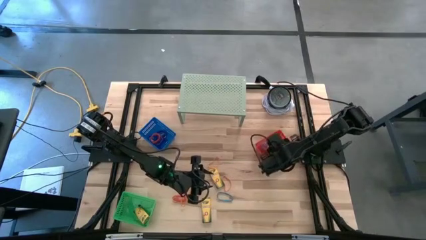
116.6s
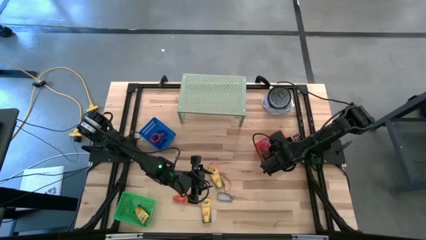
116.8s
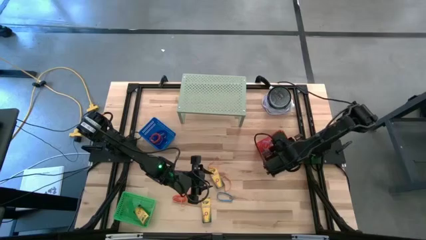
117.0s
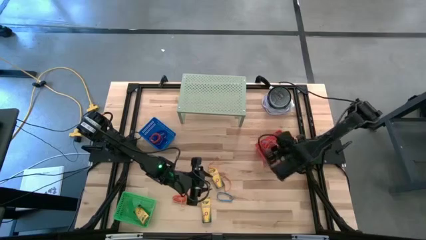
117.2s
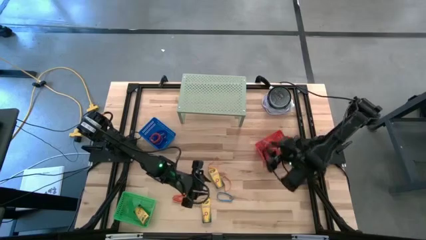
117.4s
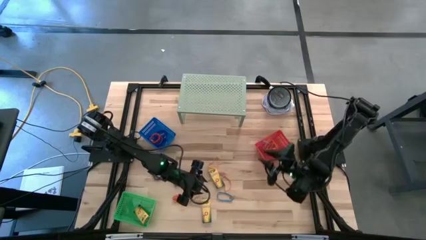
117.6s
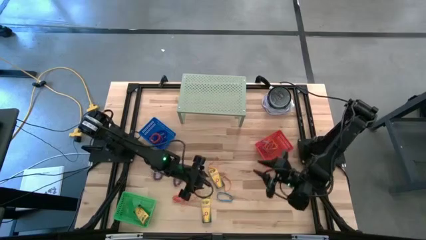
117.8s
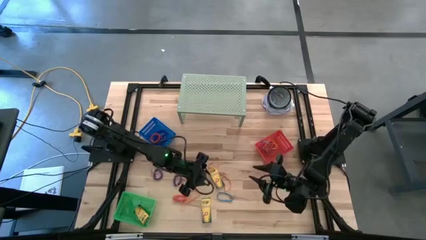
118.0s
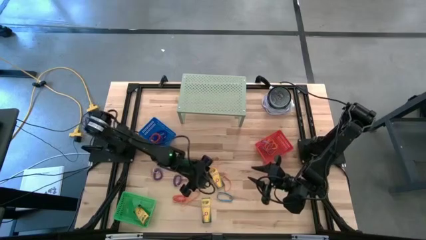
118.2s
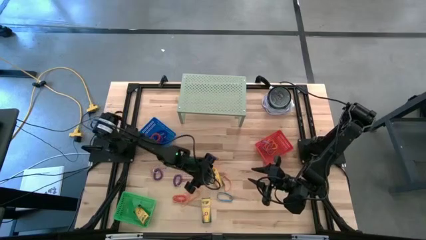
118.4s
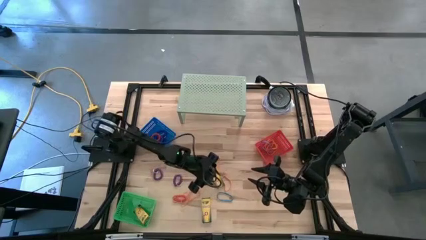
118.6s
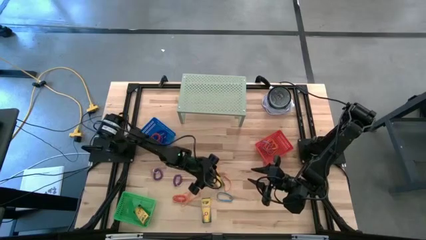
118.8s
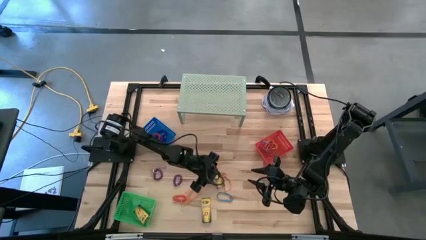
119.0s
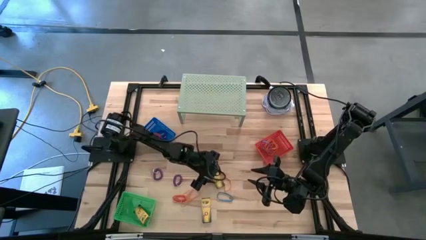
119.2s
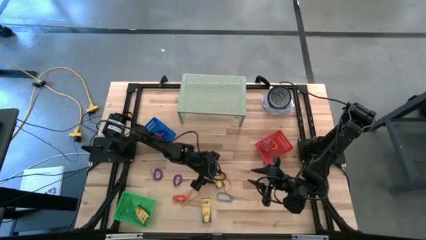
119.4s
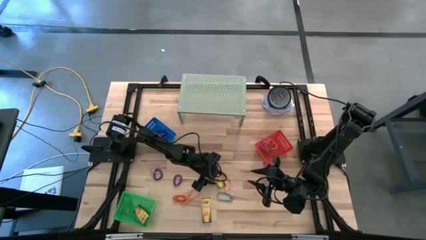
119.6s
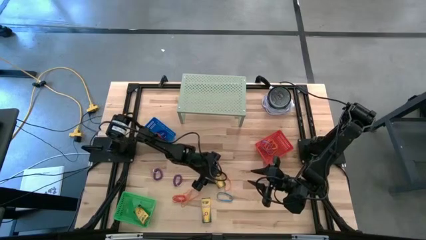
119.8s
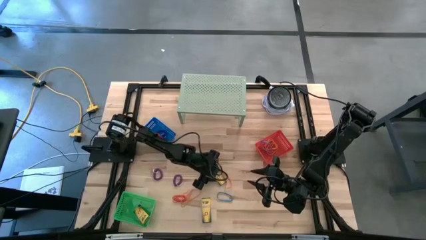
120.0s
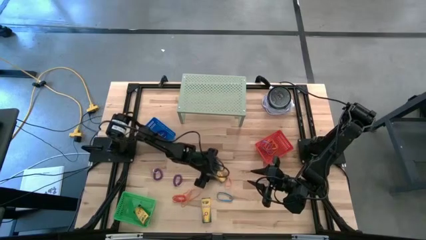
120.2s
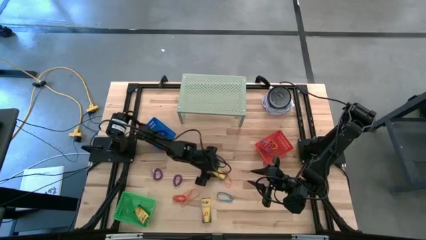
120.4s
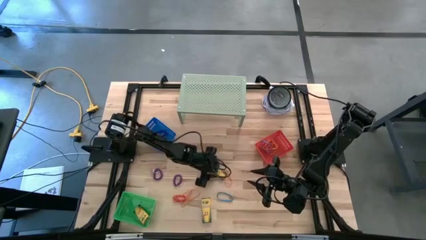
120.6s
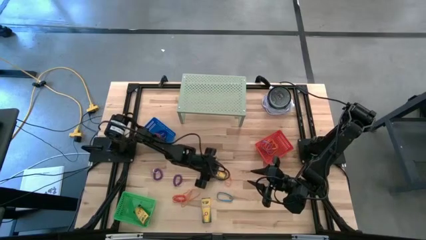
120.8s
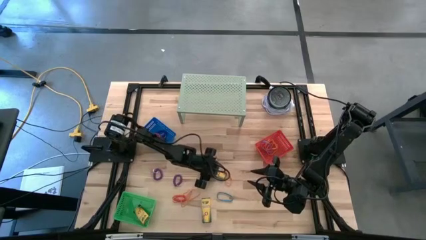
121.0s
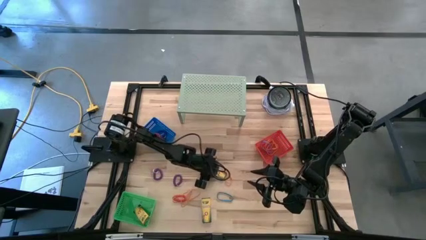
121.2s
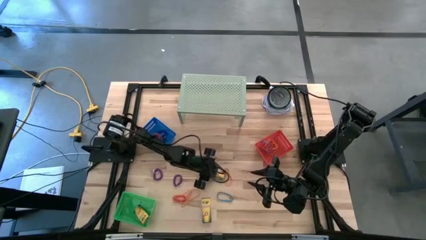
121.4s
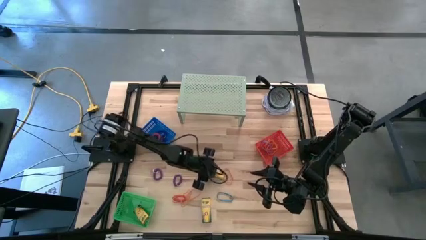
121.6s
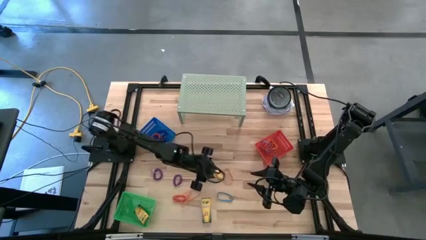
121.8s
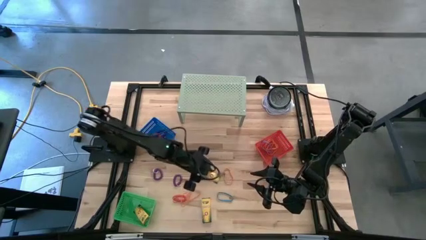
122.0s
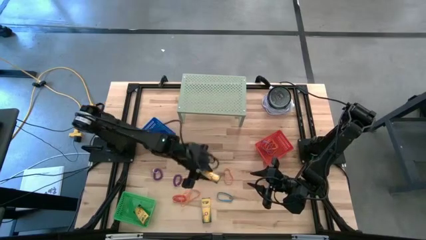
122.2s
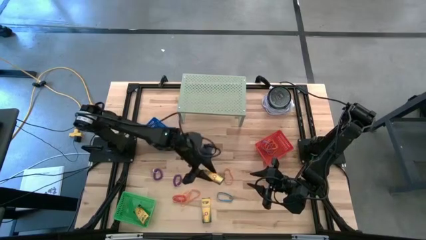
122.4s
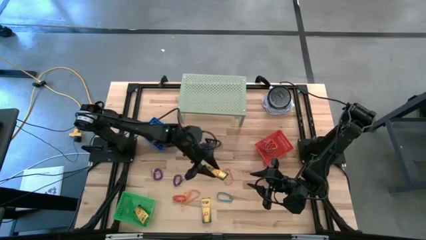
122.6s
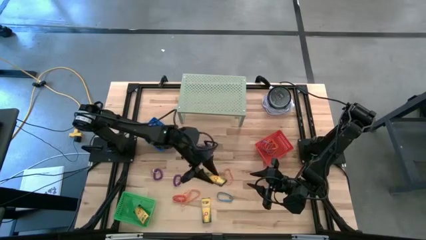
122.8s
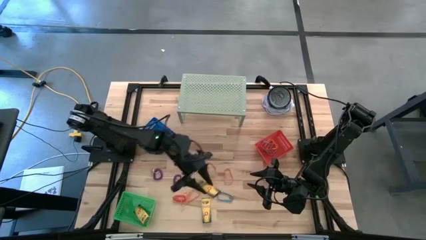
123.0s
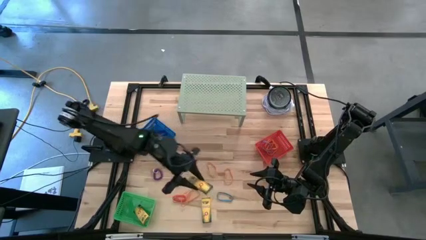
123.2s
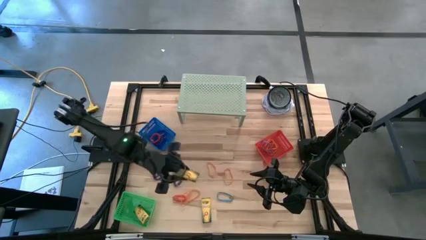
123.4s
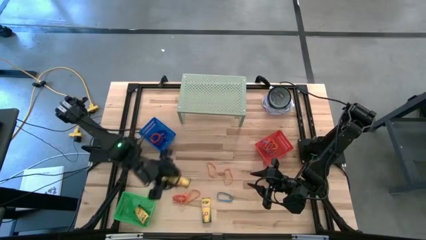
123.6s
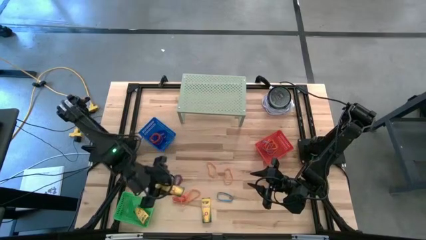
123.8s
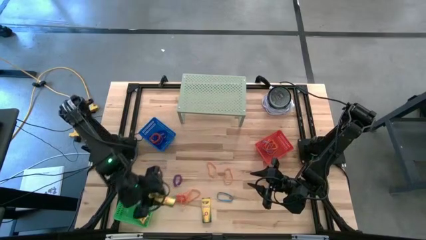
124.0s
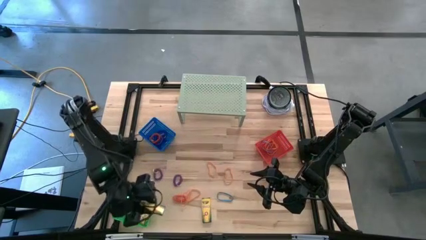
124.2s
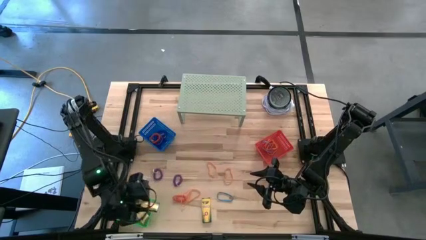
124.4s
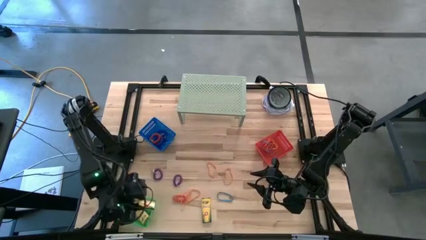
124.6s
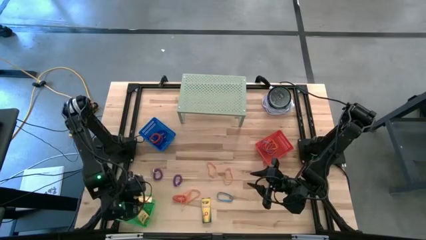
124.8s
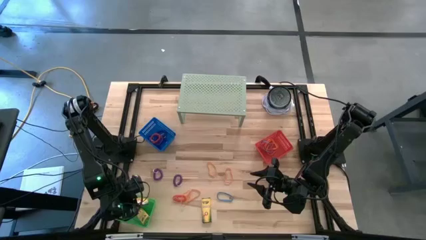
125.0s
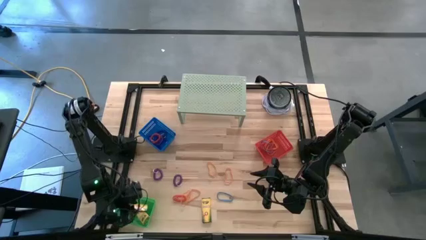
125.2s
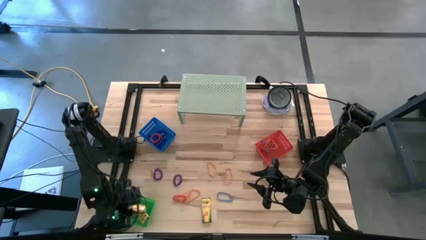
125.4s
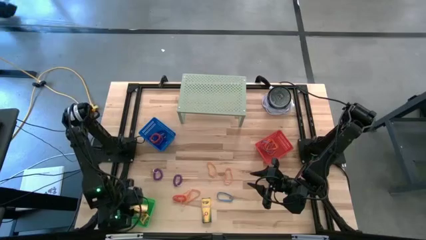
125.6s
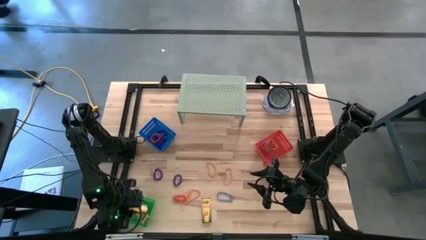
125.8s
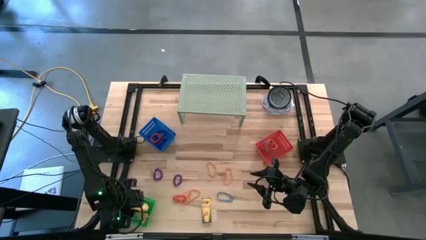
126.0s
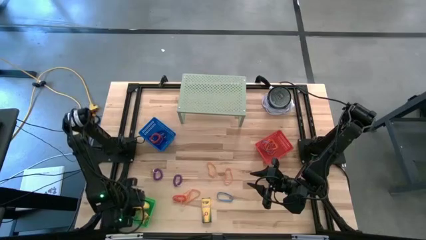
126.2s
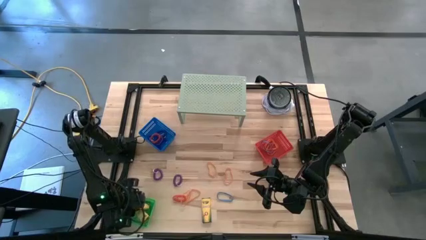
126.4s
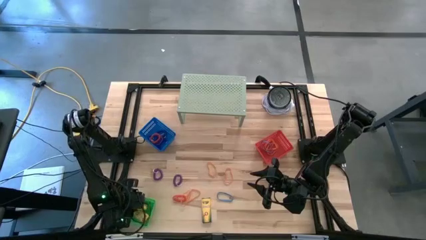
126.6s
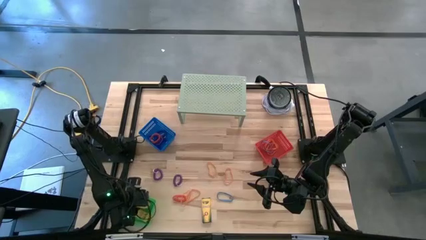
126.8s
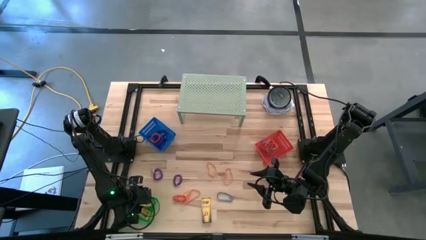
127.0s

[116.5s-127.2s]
Task: Pick & Place Office Desk Supplies
Put the crayon box into the green bin

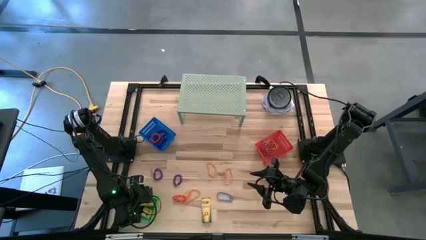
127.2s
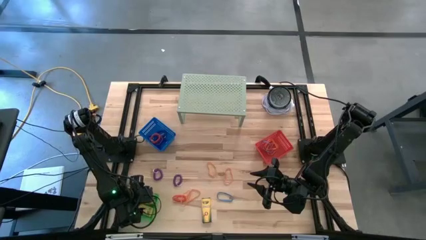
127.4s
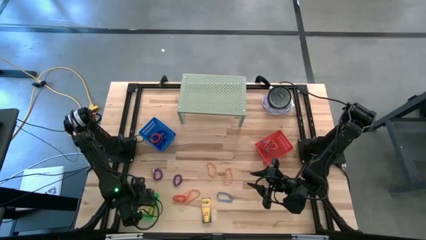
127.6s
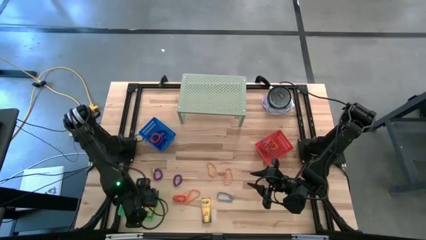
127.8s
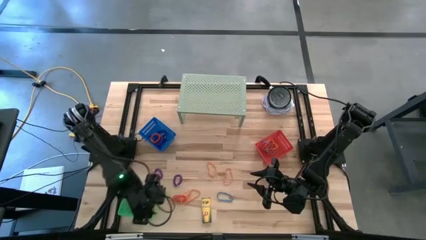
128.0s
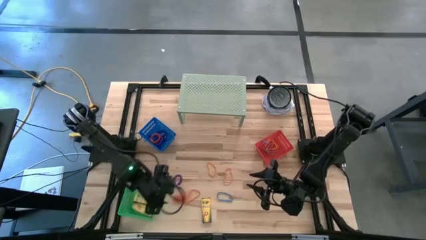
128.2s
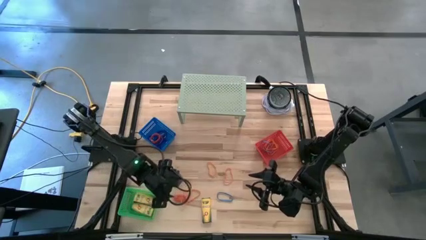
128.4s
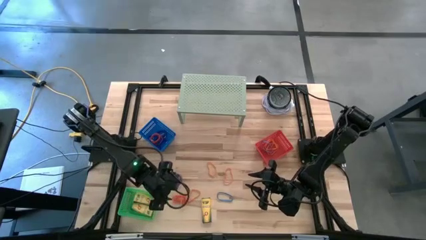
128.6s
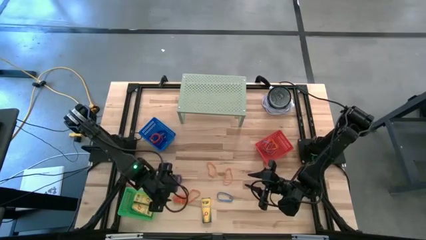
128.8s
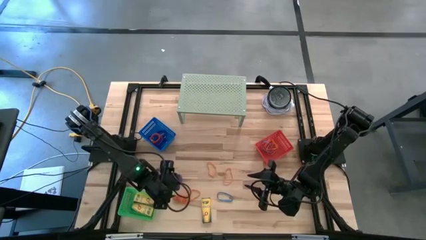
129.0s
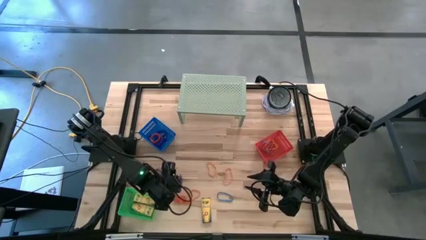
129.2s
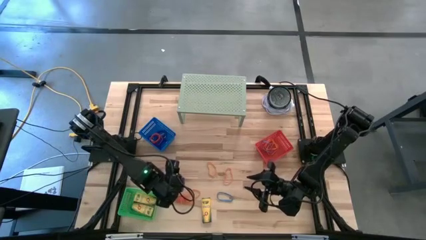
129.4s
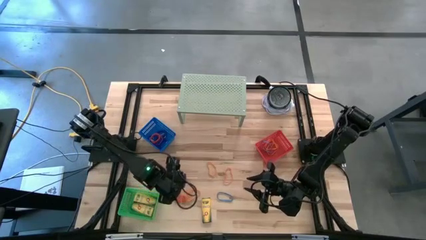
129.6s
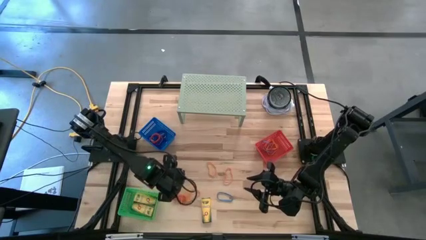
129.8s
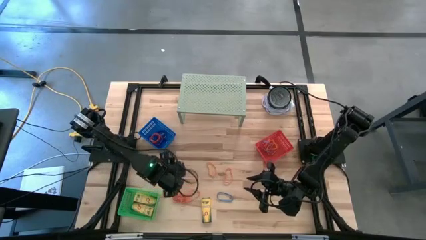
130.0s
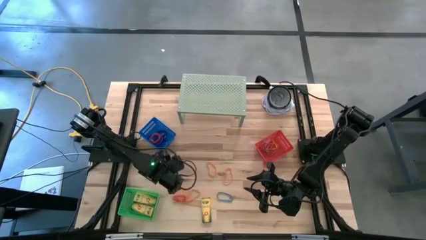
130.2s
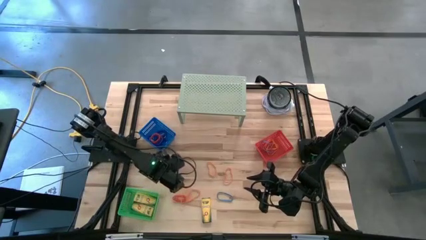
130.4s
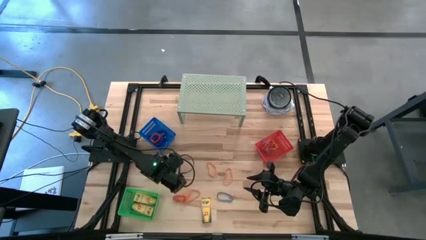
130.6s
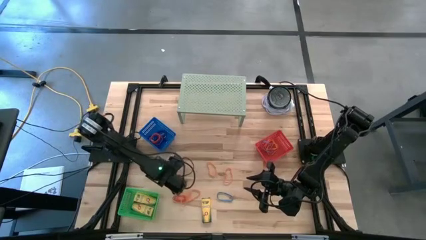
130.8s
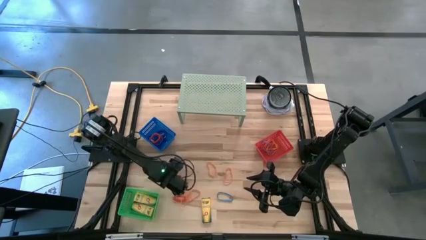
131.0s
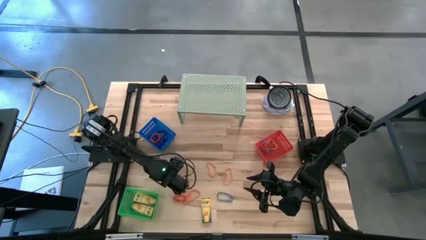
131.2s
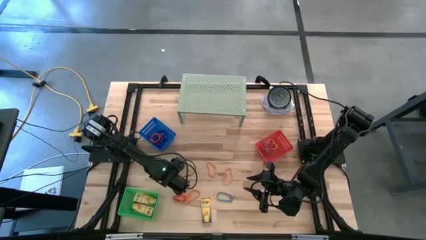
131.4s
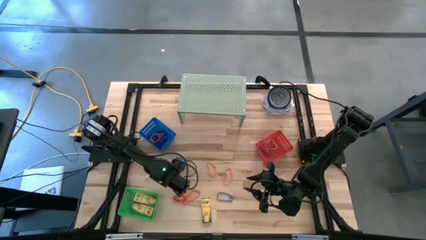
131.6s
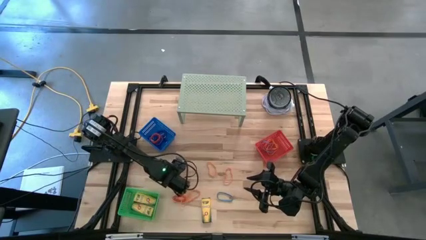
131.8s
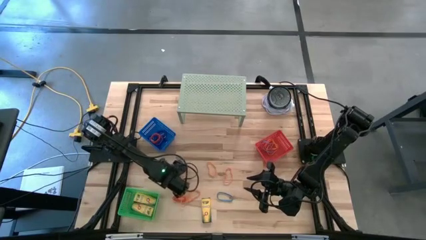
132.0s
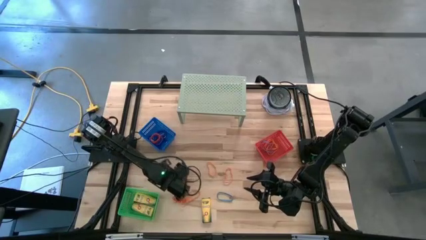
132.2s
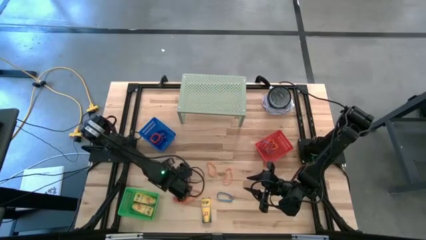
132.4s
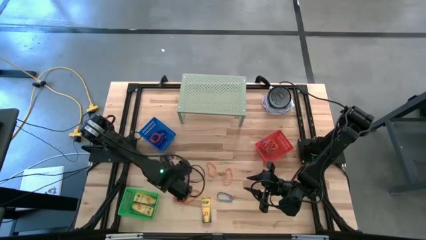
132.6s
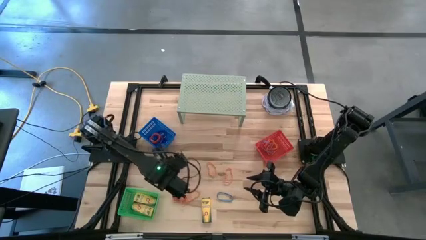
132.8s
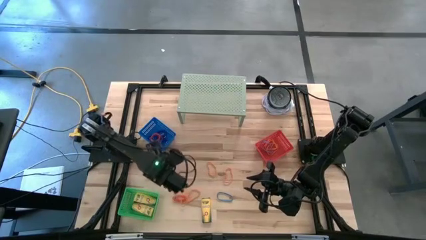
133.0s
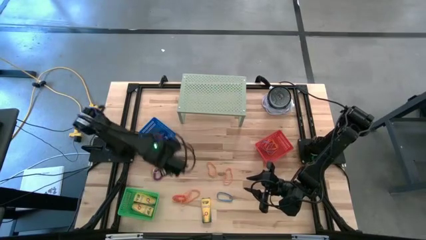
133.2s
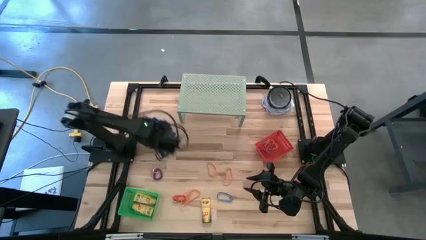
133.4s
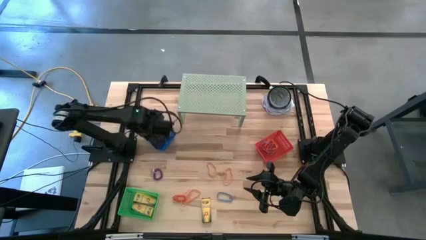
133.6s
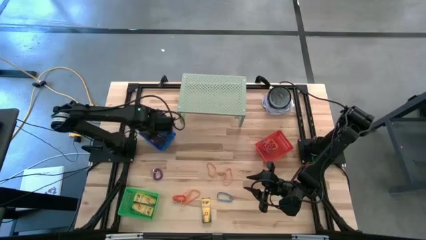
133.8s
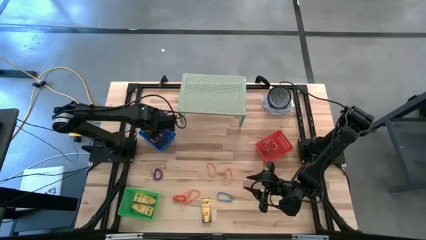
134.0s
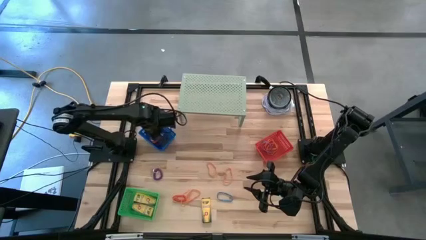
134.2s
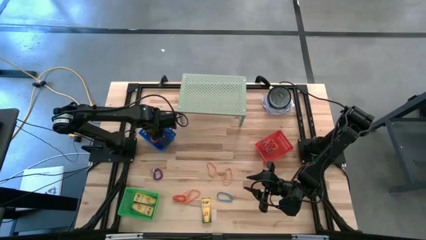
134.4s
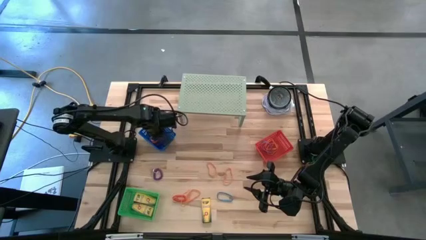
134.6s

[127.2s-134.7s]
Put the purple spring keychain into the blue bin
